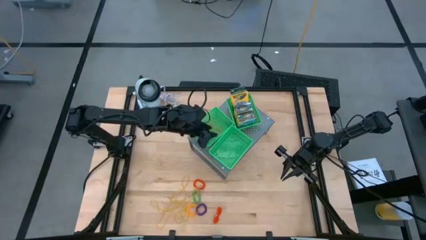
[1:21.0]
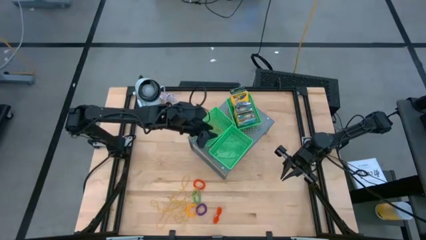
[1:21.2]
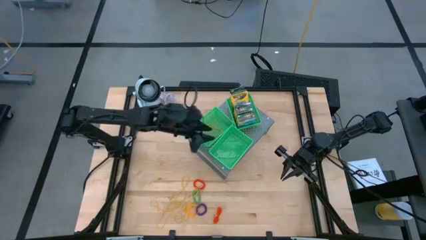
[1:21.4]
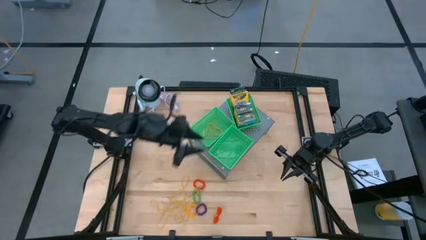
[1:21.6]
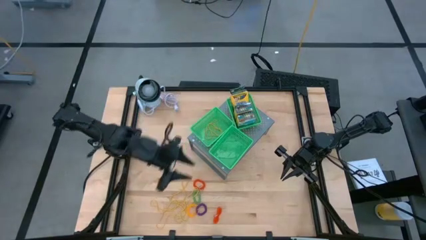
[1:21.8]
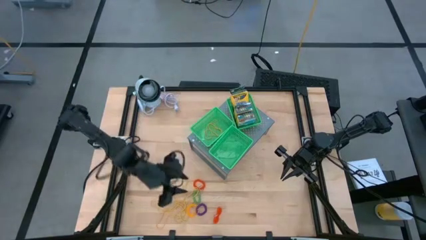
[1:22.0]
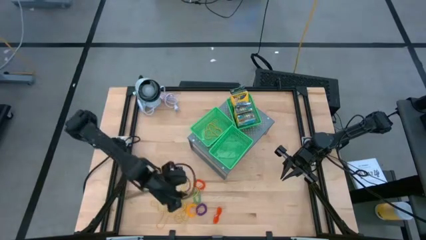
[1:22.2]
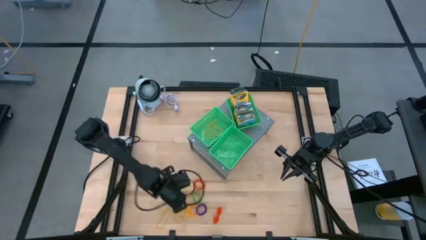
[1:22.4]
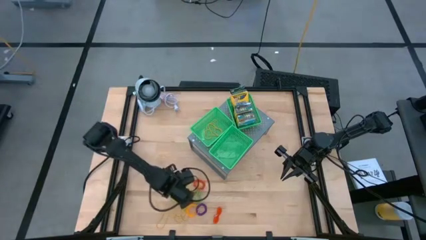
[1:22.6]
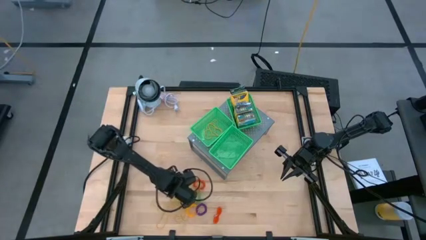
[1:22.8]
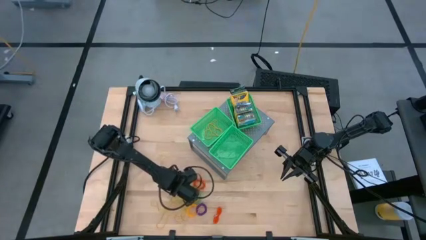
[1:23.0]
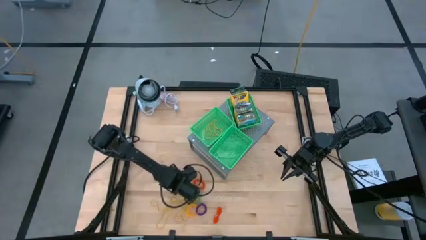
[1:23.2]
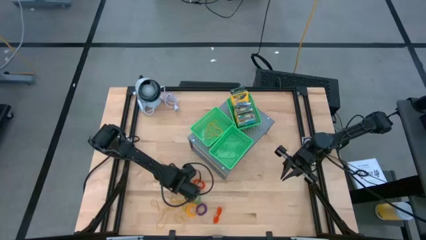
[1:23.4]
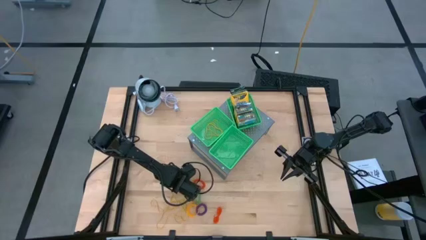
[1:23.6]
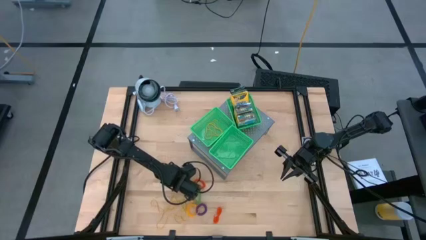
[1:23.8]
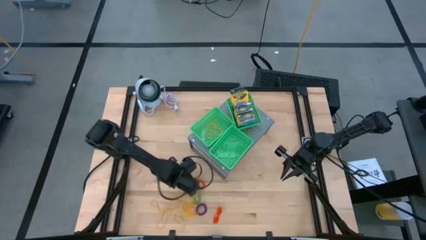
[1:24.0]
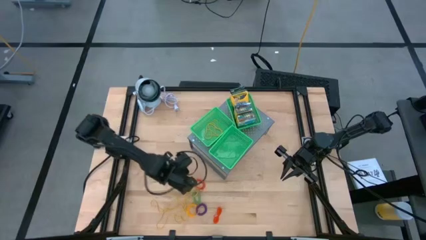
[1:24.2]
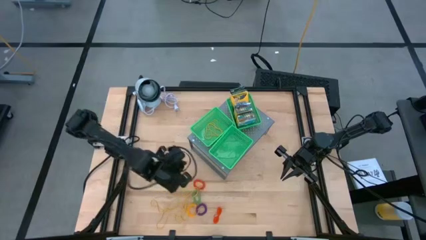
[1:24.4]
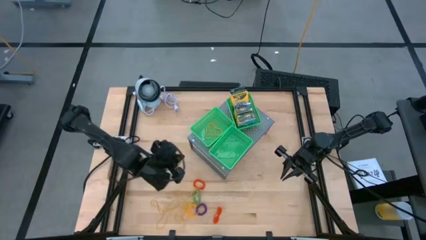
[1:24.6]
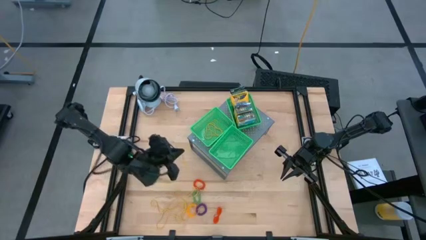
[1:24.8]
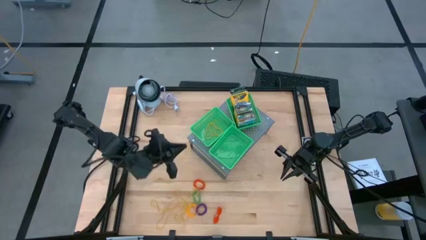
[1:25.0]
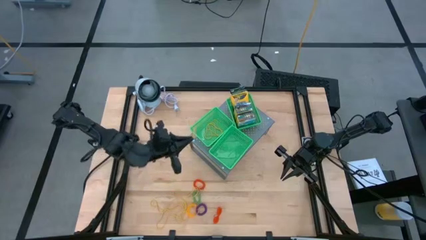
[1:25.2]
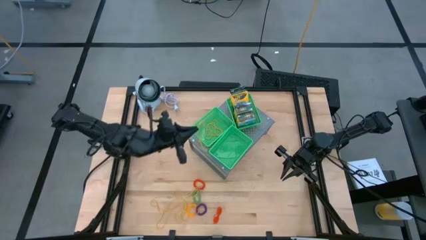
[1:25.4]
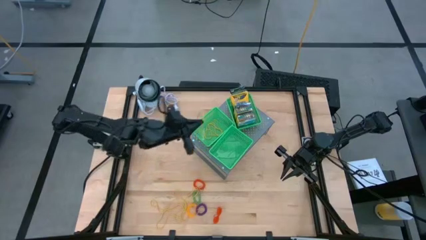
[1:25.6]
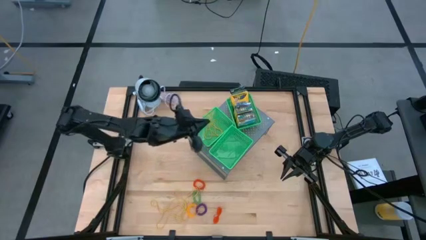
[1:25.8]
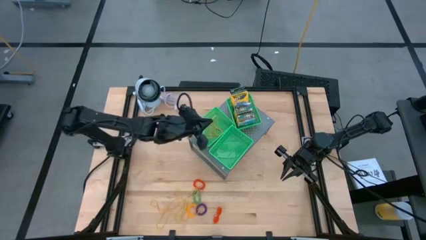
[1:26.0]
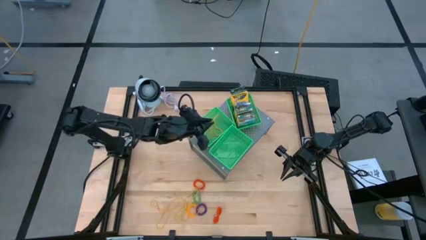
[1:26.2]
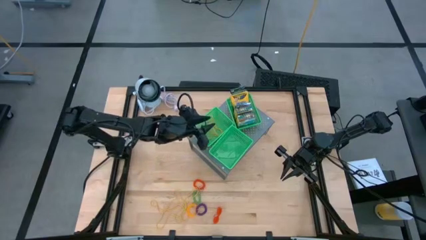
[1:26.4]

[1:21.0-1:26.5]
Task: Pick & Place Office Desk Supplies
Put the yellow rubber band into the top left green bin on the shelf

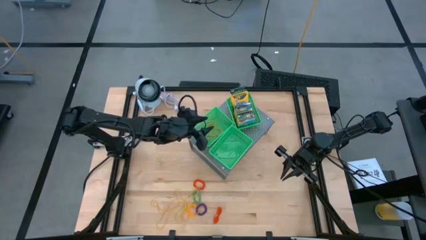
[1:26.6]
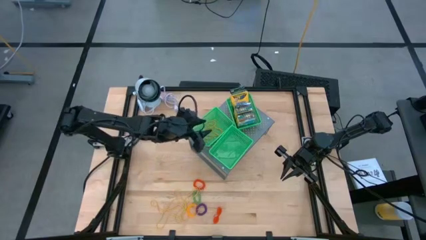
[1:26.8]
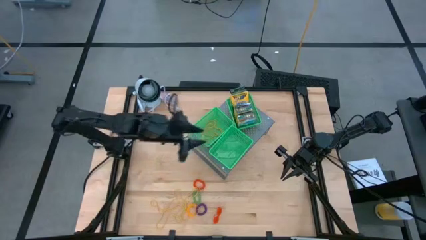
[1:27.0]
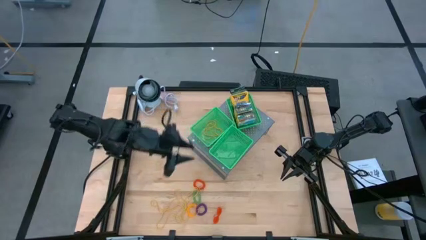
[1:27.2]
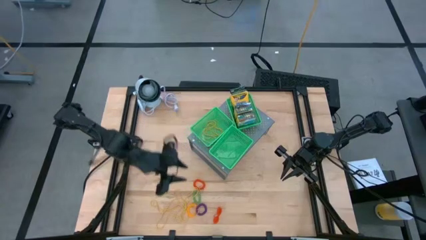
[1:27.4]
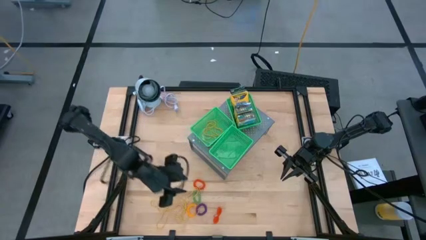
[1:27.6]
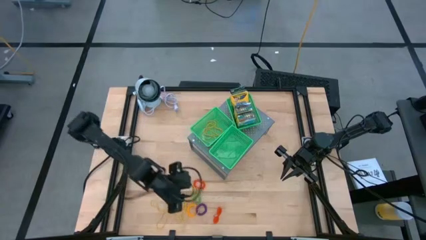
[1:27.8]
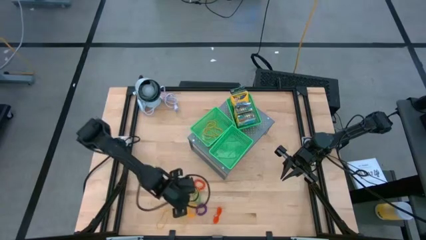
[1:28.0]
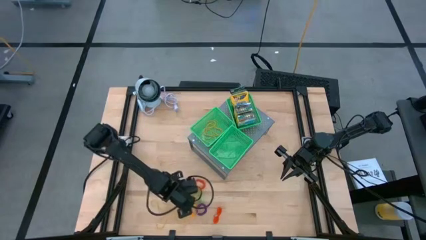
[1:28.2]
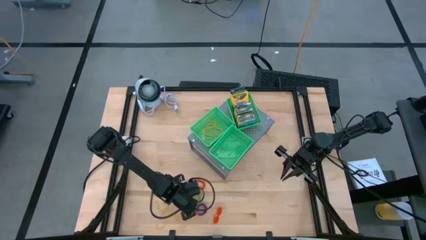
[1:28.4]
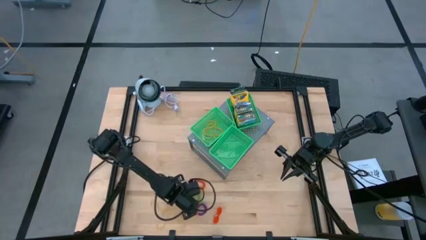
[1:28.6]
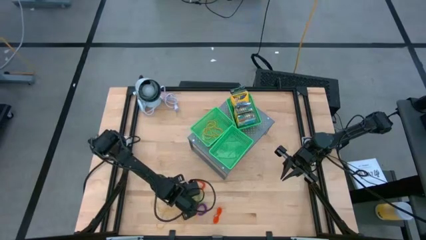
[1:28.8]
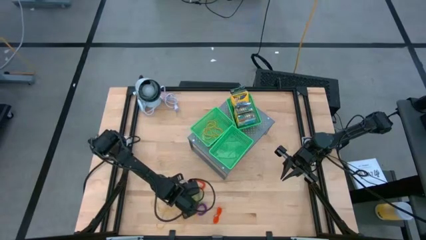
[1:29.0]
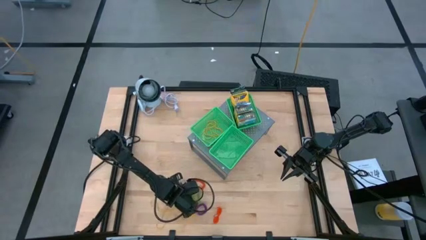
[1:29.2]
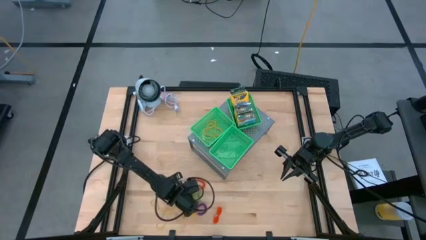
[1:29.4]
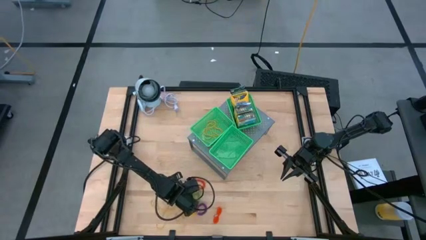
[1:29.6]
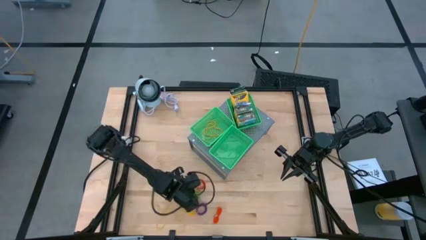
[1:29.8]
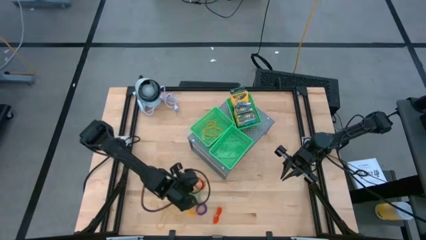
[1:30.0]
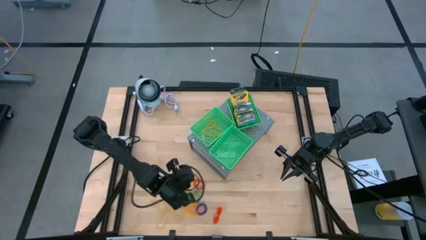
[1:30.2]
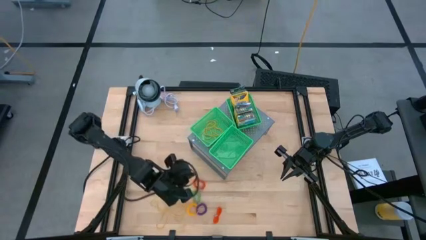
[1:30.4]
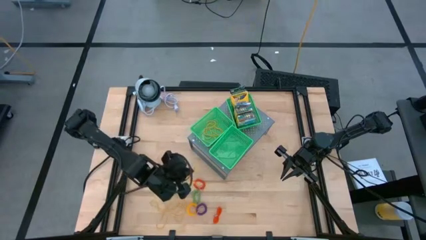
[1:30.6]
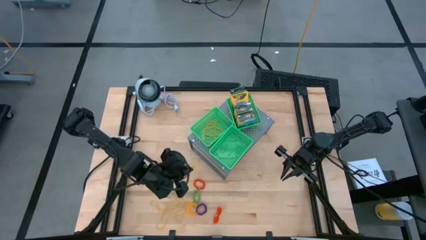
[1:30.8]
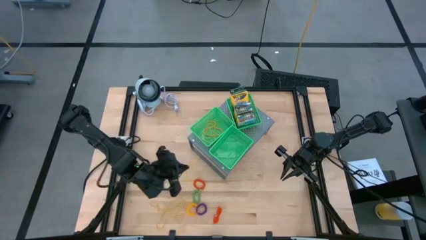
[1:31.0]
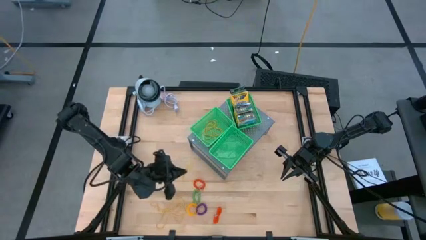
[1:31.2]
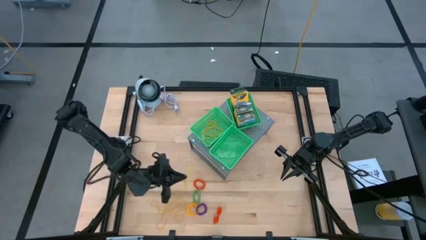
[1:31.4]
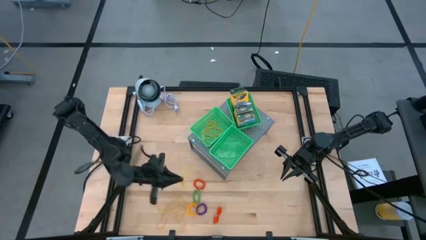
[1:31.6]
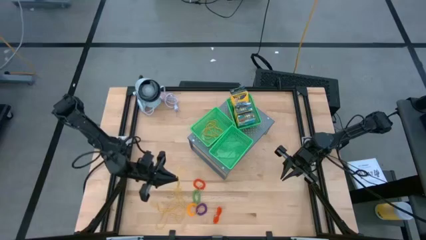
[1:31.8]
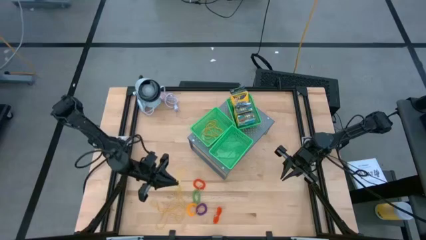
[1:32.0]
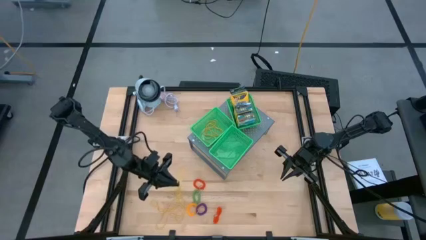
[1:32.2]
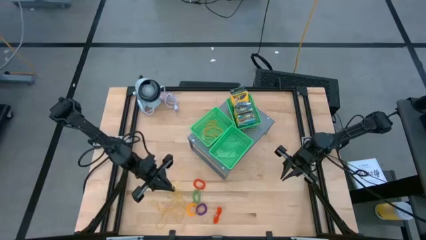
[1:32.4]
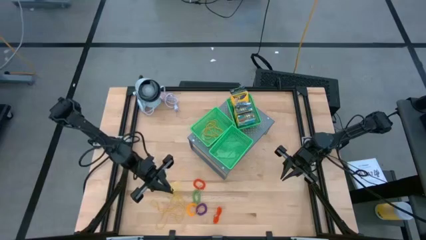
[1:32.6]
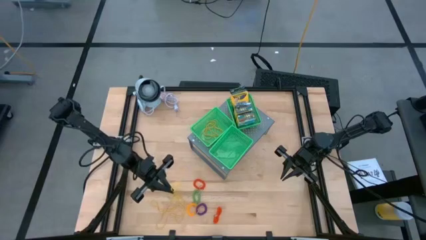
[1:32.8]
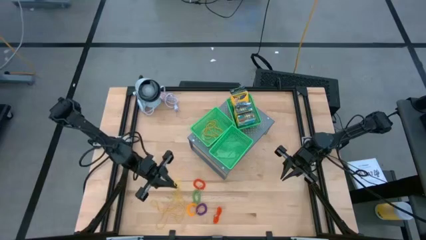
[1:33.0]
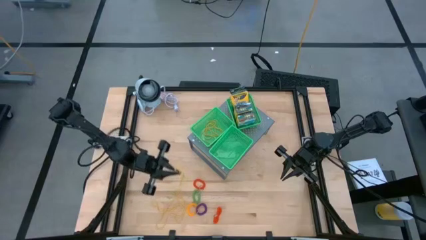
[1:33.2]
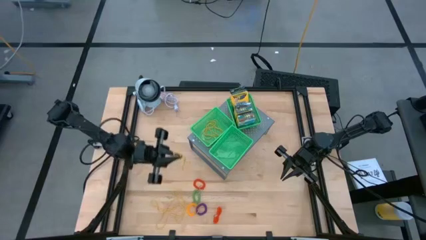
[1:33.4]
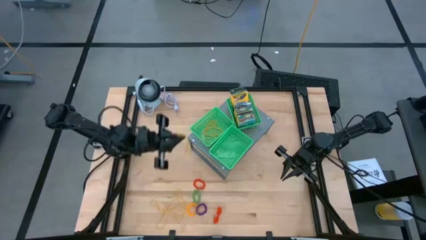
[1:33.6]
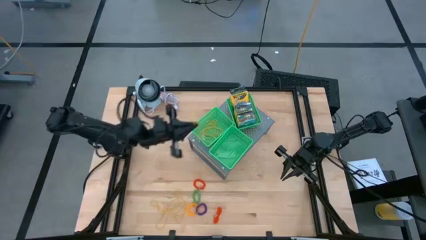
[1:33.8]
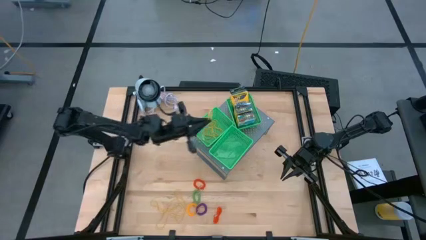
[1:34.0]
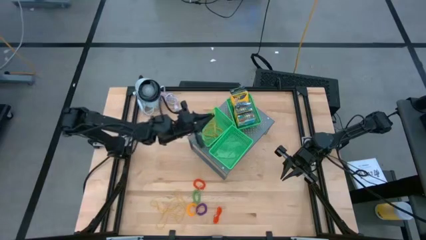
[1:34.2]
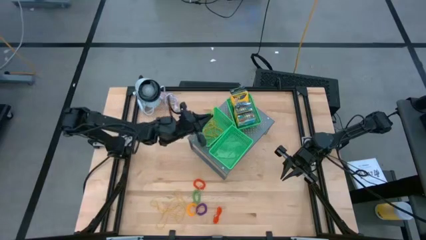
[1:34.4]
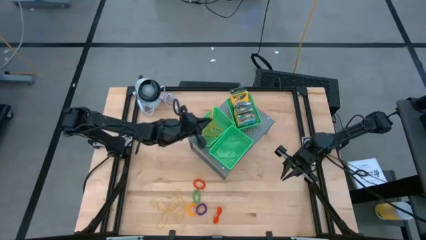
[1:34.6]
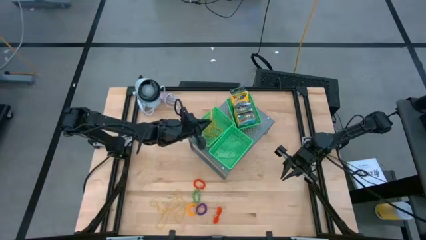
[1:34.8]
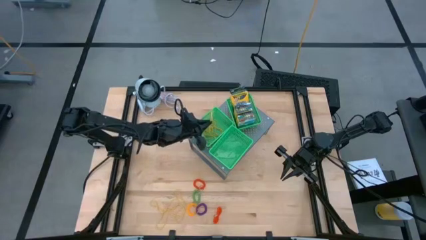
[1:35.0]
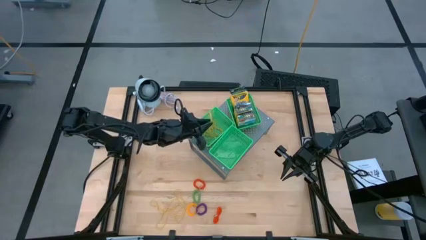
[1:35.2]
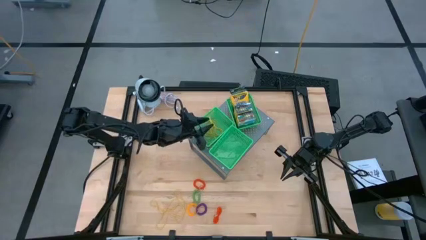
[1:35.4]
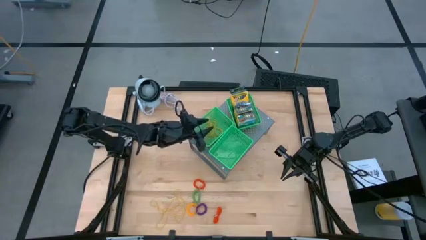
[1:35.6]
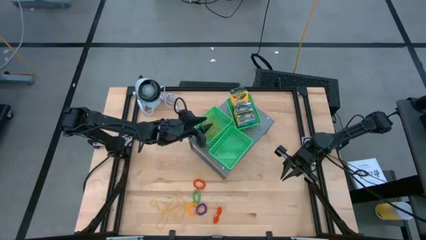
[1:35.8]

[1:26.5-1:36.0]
Put the yellow rubber band into the top left green bin on the shelf

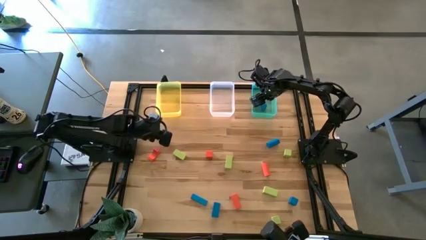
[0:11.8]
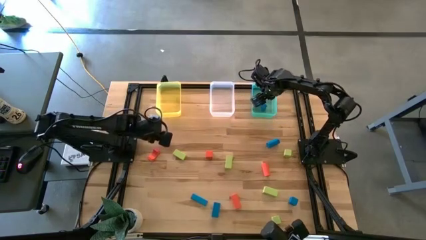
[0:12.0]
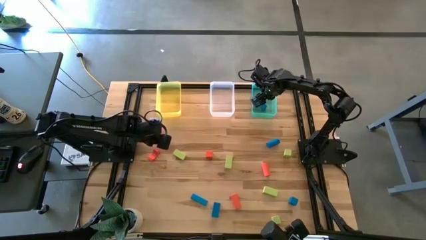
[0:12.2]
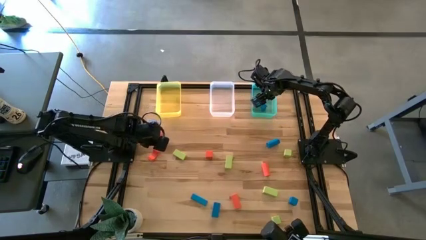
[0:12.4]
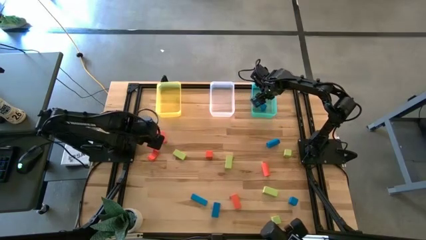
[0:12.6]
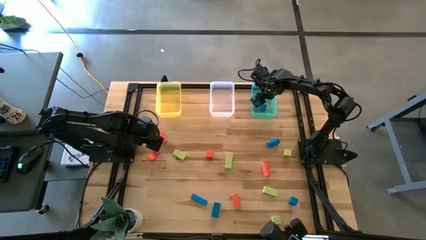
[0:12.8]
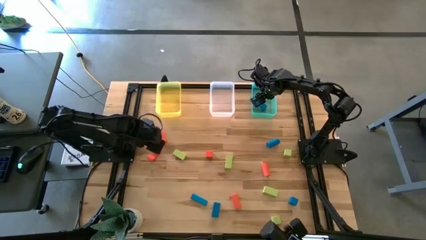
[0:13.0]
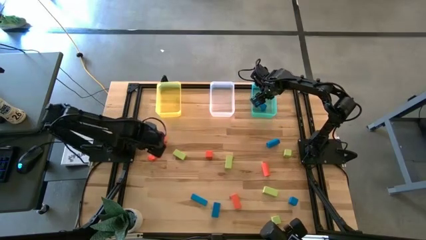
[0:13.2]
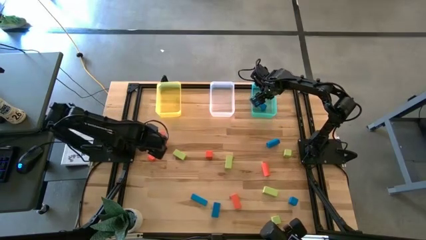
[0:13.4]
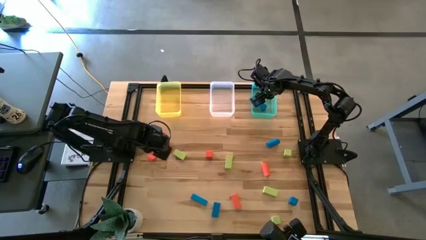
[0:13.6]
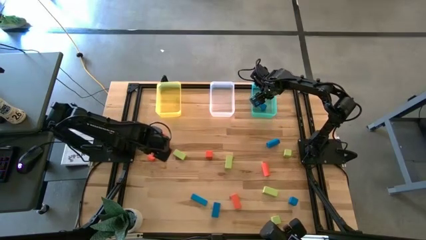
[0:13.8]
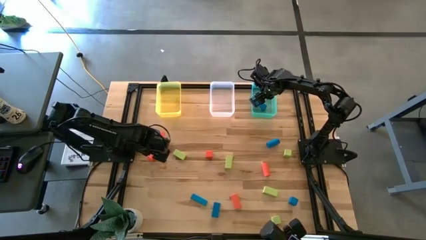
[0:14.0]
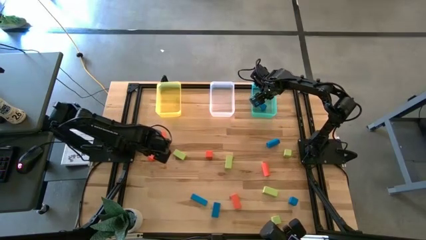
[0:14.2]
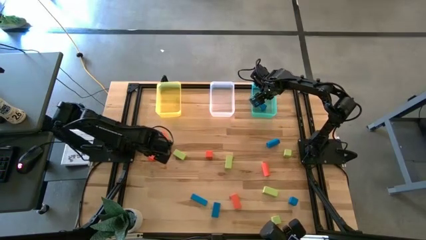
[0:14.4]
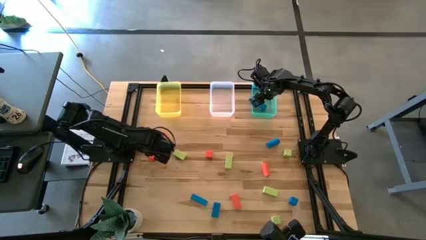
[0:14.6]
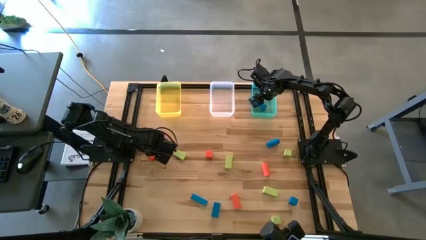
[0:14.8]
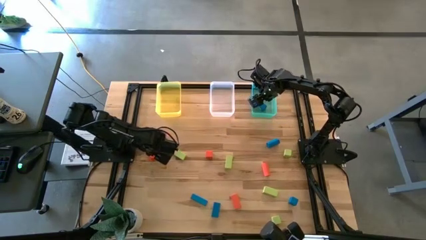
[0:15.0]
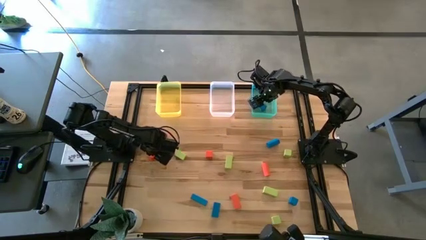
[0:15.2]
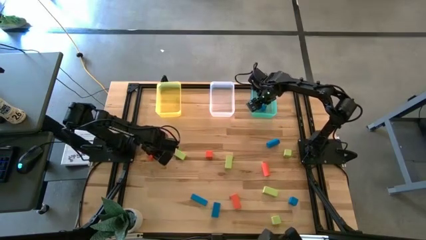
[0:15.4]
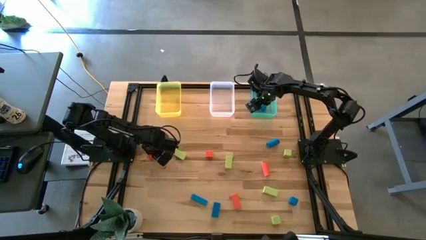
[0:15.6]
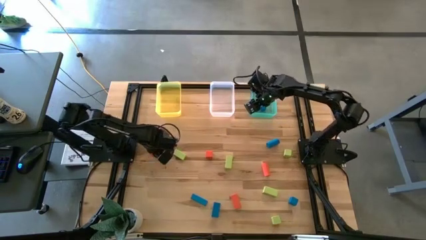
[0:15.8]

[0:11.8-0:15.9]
Task: Sort & place blocks by color
Put the orange block into the yellow bin
